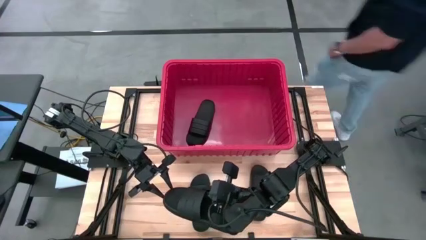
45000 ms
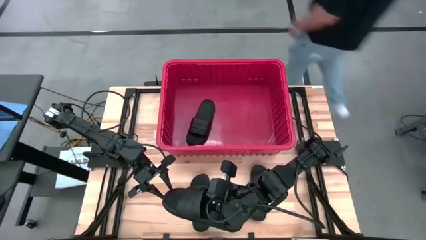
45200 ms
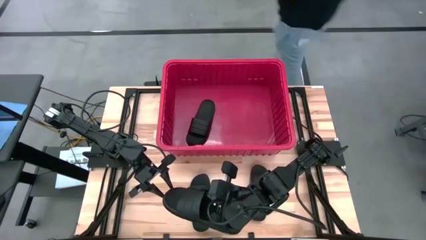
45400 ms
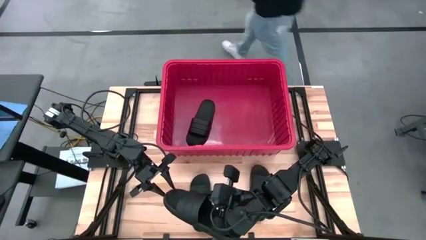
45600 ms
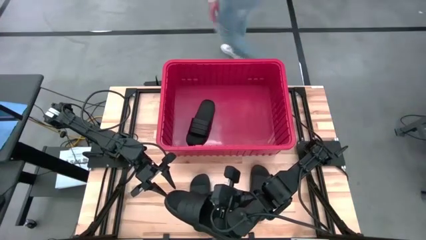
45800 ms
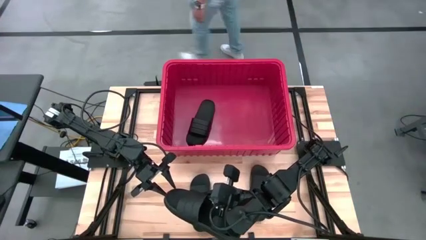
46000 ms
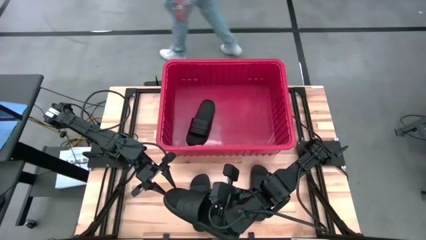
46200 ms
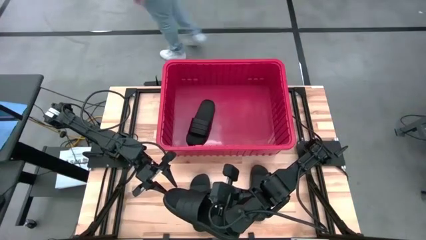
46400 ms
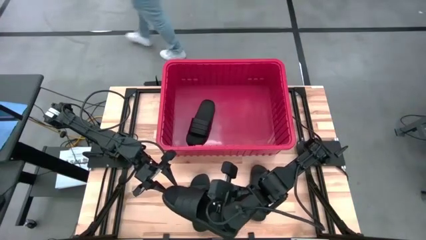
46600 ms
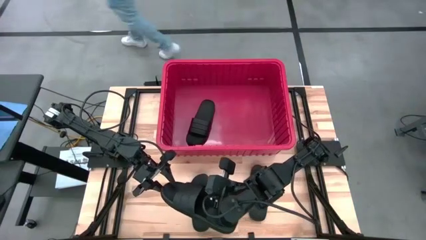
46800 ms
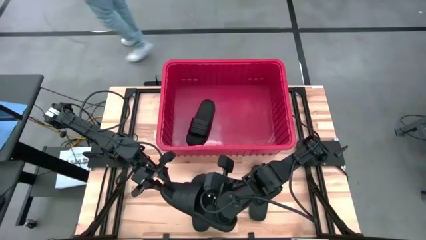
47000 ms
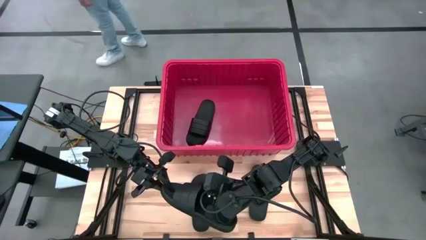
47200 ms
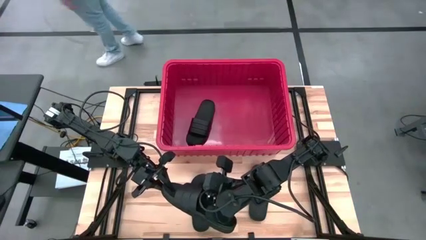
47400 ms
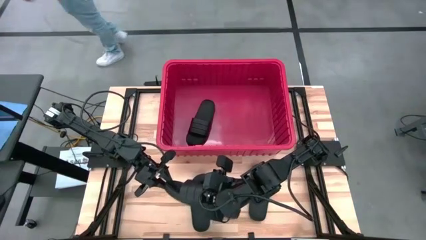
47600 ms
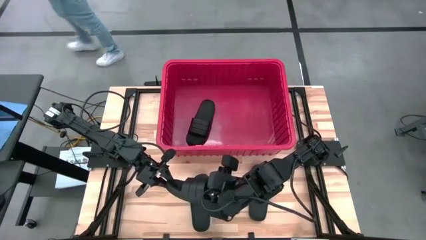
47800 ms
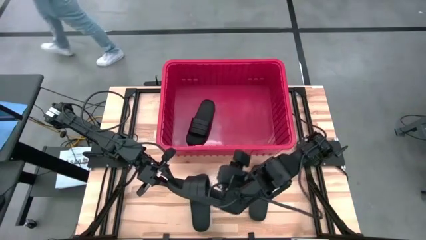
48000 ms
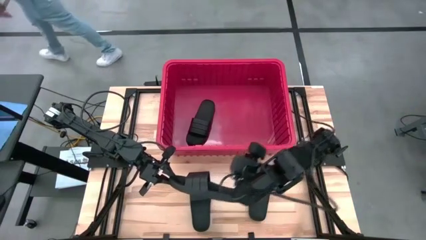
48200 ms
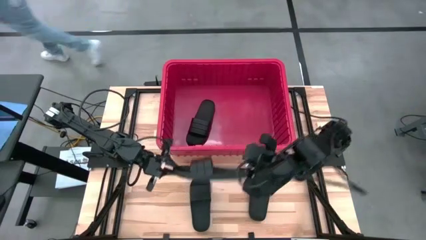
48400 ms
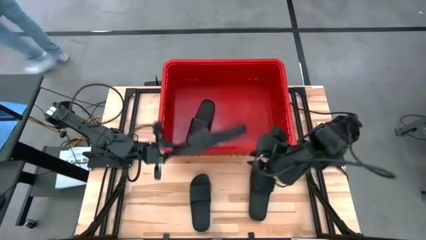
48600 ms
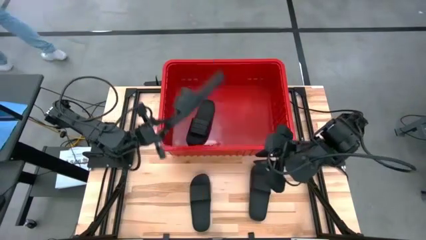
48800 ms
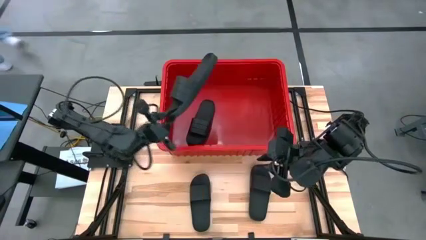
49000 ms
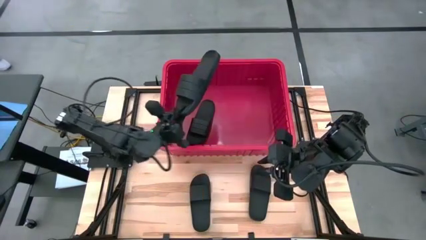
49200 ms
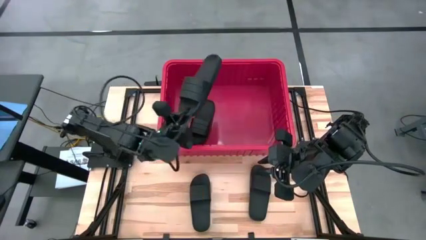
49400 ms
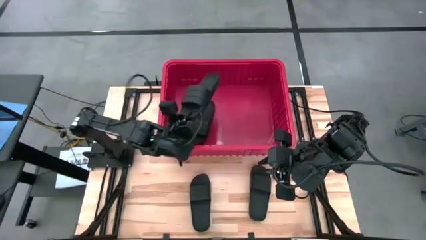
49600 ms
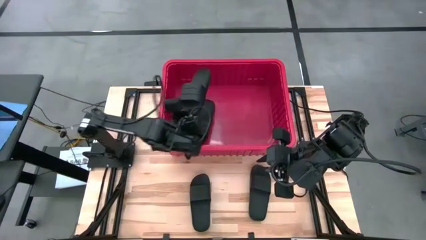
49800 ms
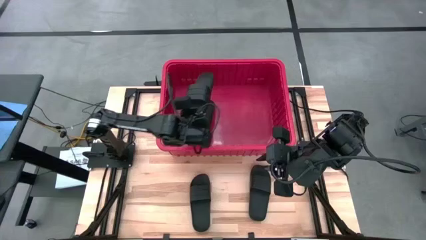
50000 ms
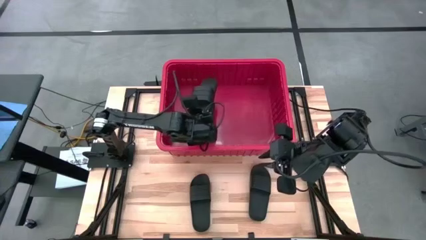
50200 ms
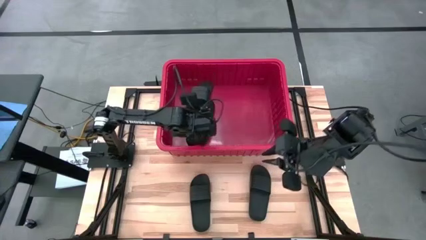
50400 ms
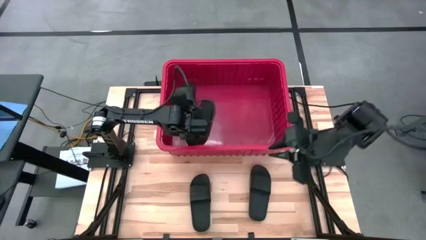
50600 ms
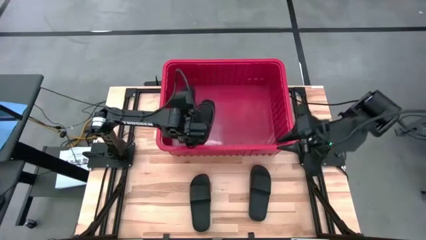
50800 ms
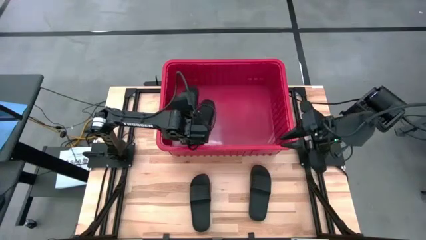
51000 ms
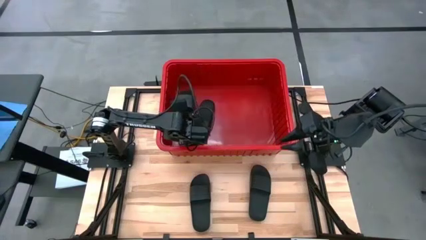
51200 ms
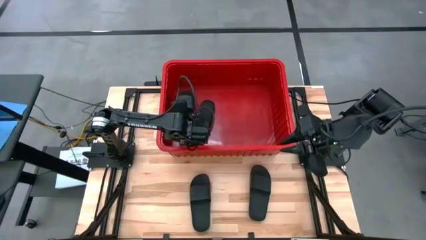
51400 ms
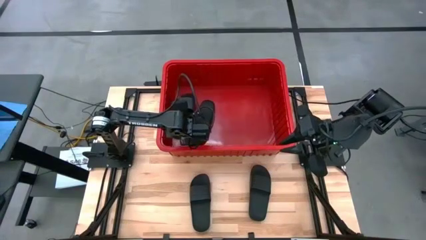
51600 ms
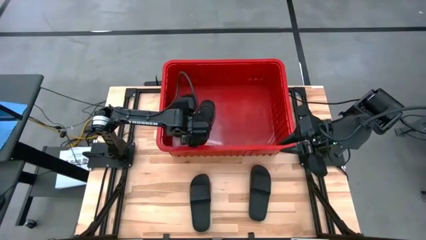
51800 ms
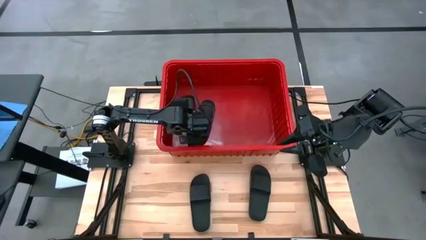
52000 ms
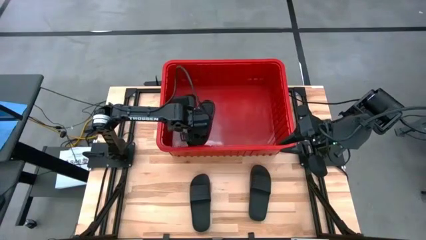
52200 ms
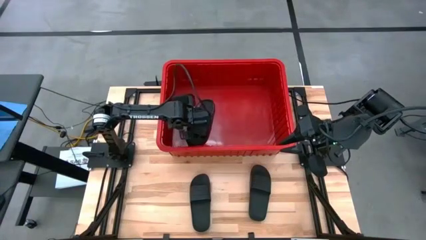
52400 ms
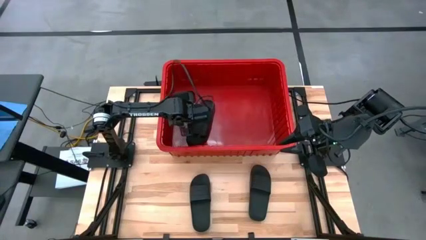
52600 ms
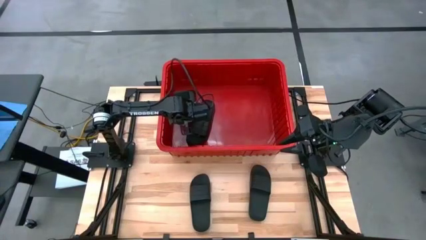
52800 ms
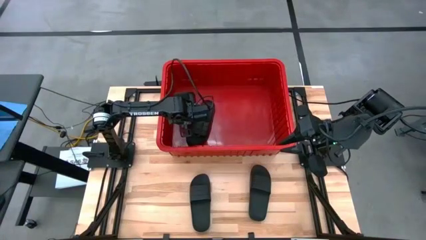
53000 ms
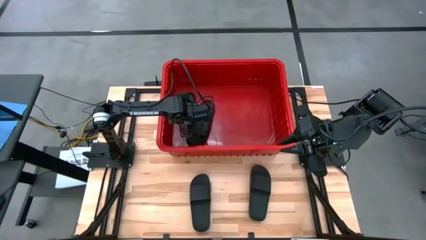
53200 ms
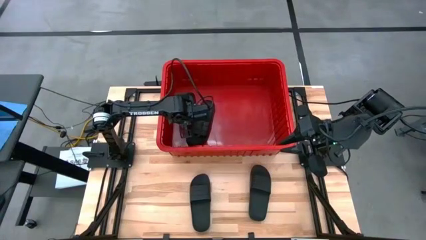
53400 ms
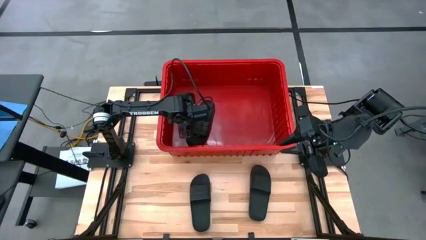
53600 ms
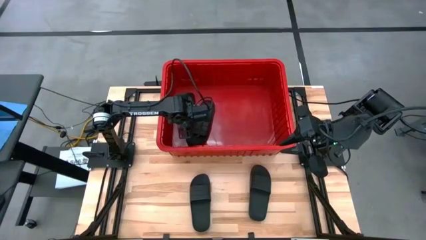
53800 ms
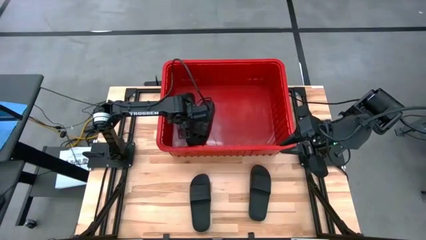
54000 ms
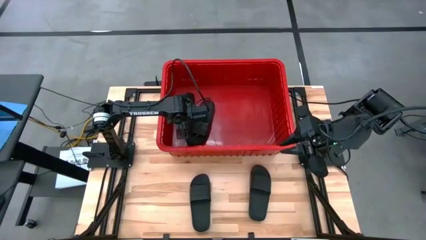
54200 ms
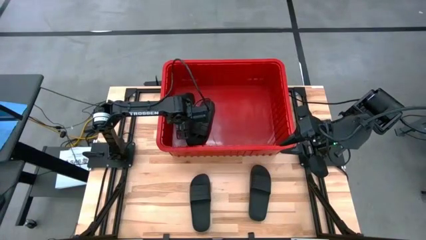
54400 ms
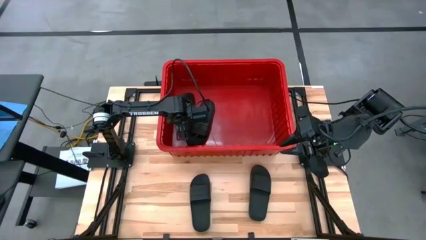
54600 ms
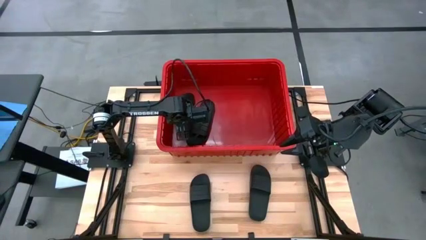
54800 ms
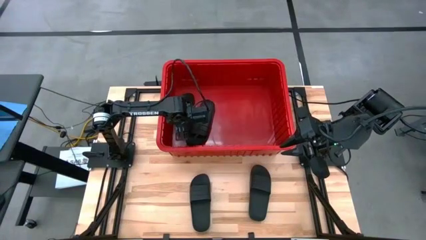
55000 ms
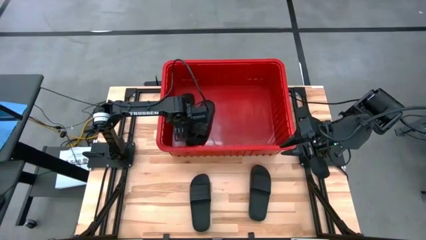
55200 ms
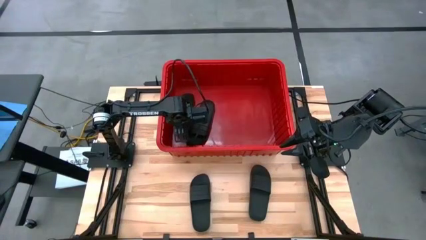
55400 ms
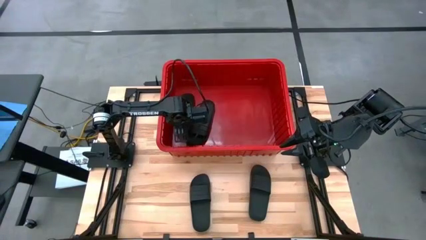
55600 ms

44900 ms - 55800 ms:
Task: Pick and place slides into bin
Put the black slide into the red bin
